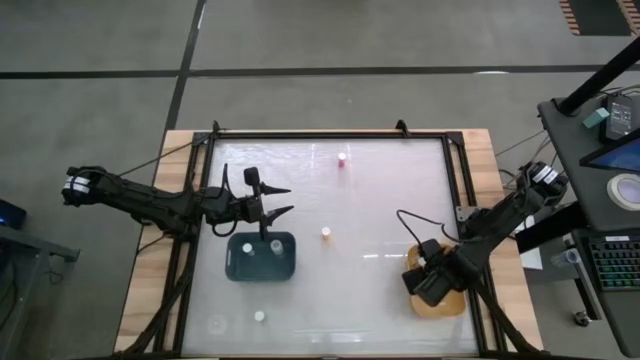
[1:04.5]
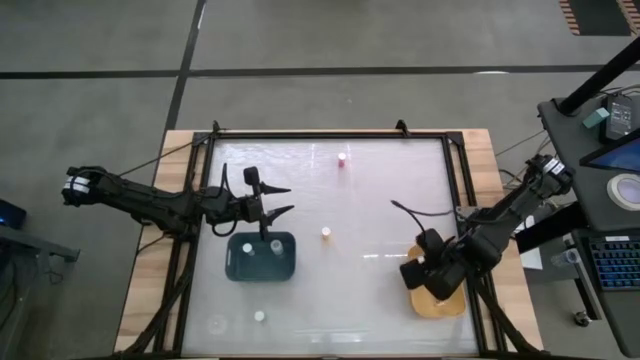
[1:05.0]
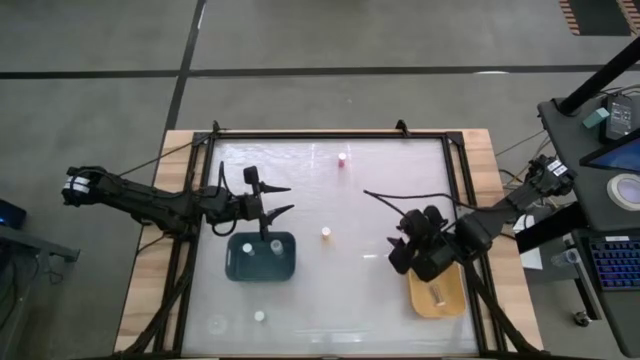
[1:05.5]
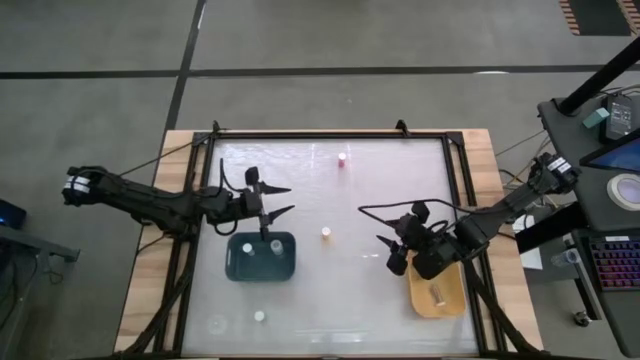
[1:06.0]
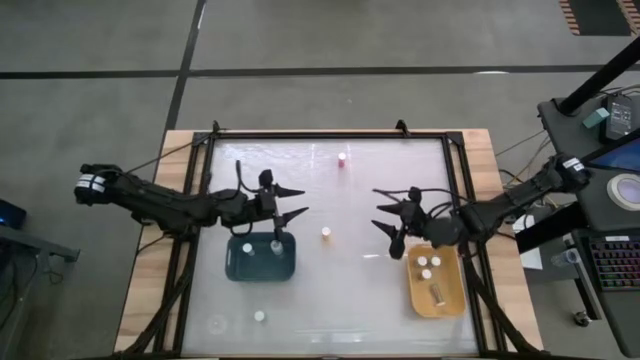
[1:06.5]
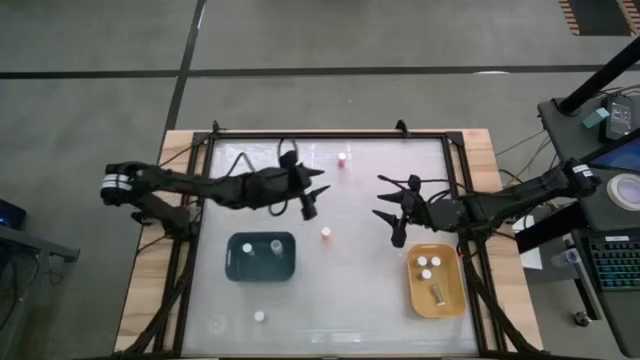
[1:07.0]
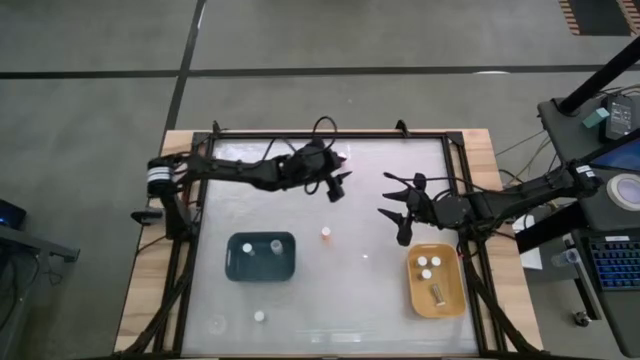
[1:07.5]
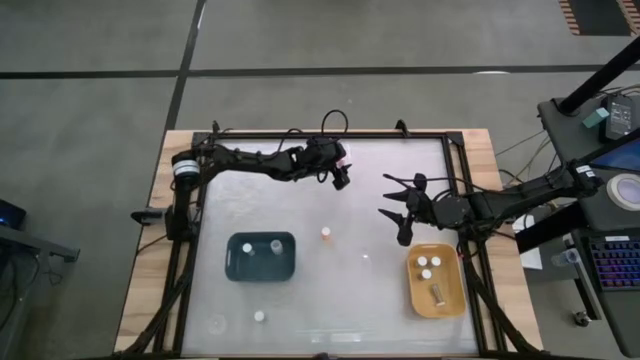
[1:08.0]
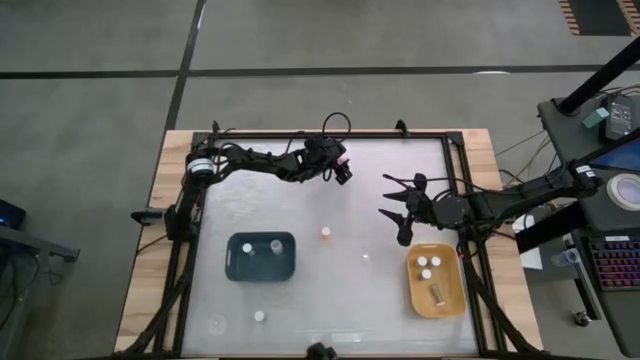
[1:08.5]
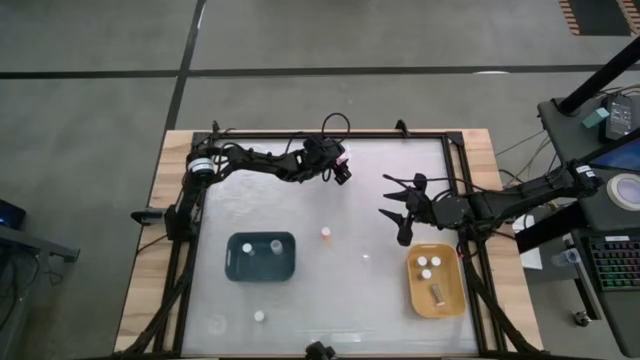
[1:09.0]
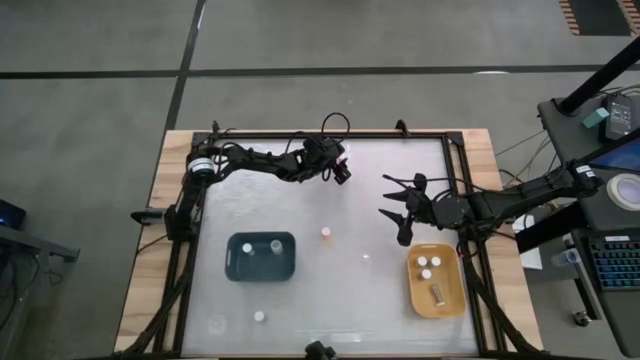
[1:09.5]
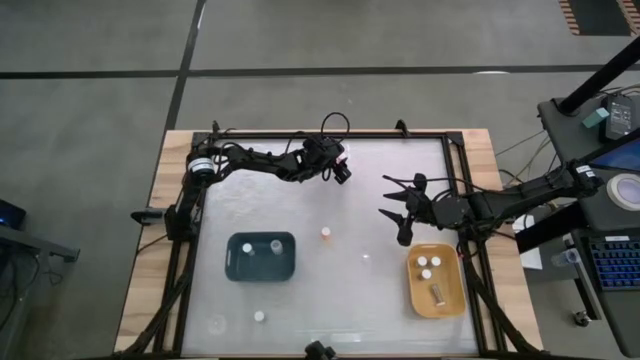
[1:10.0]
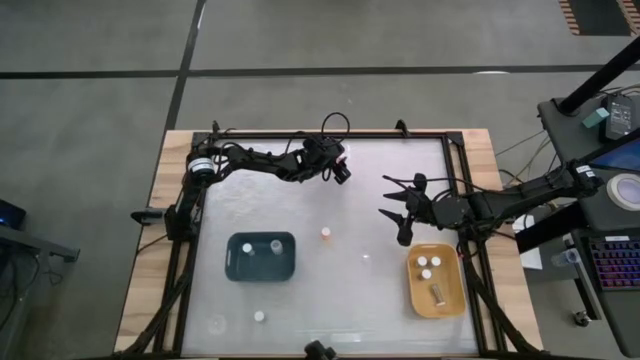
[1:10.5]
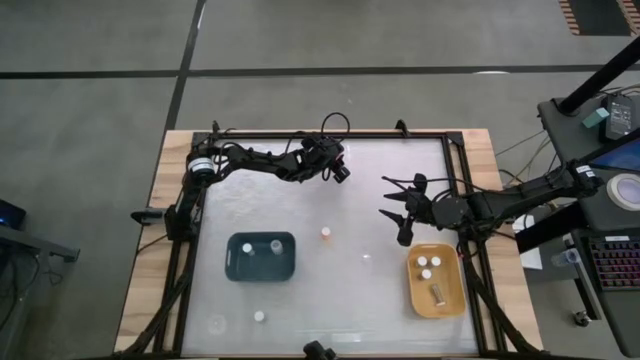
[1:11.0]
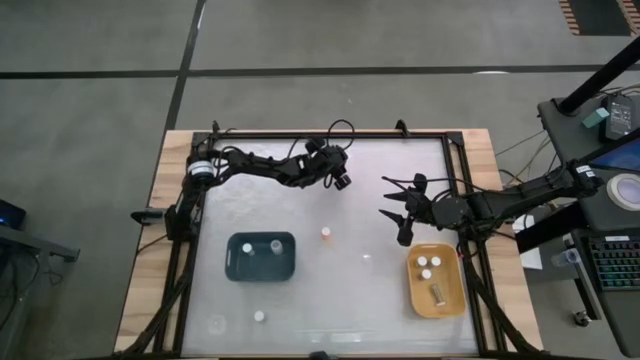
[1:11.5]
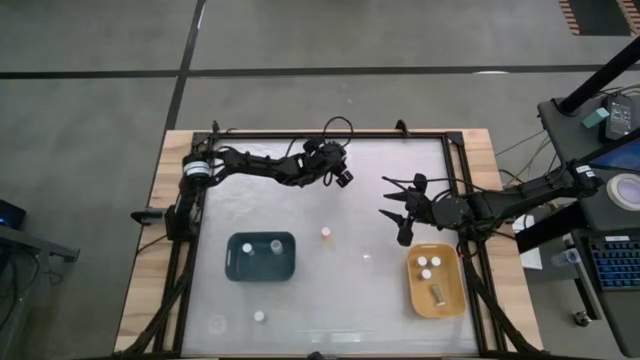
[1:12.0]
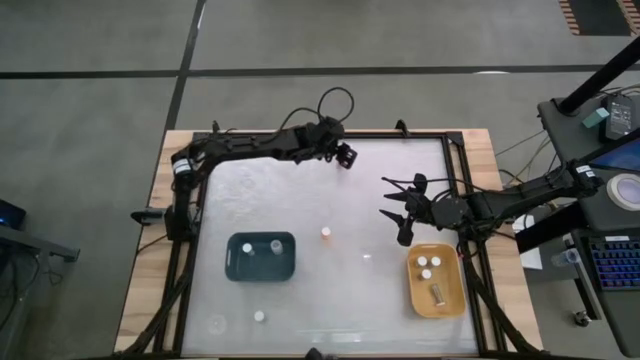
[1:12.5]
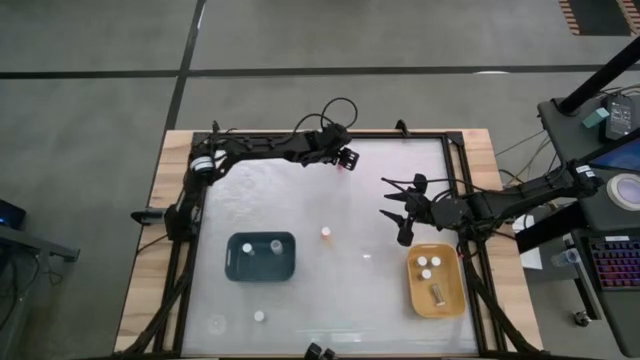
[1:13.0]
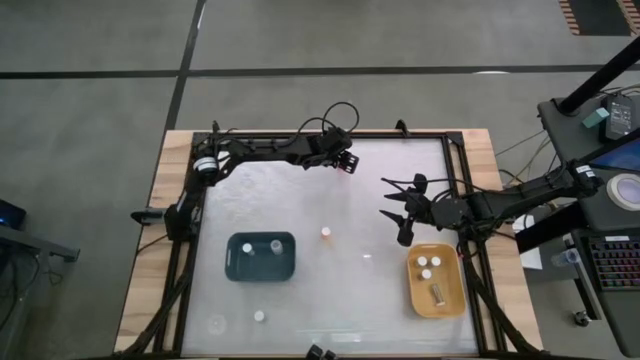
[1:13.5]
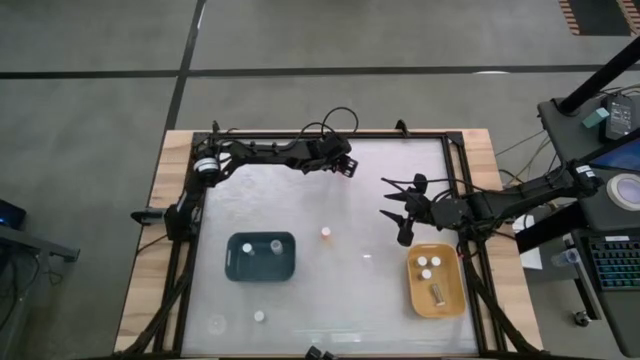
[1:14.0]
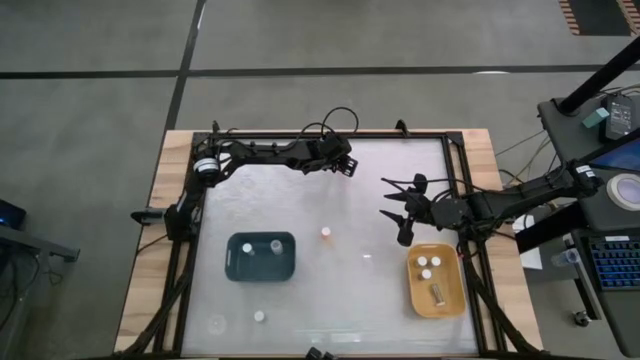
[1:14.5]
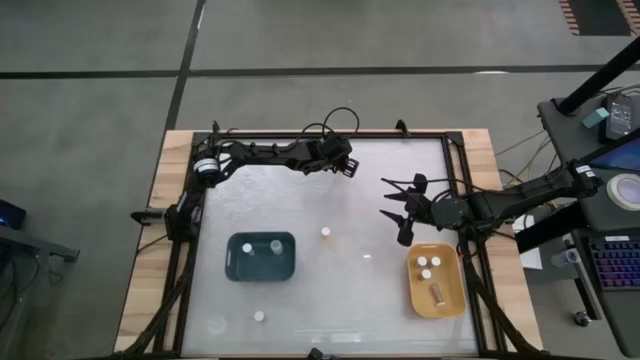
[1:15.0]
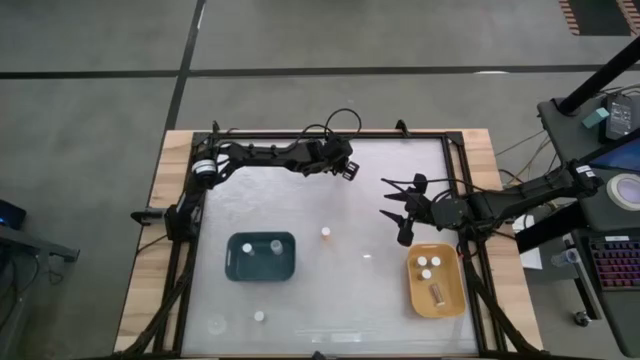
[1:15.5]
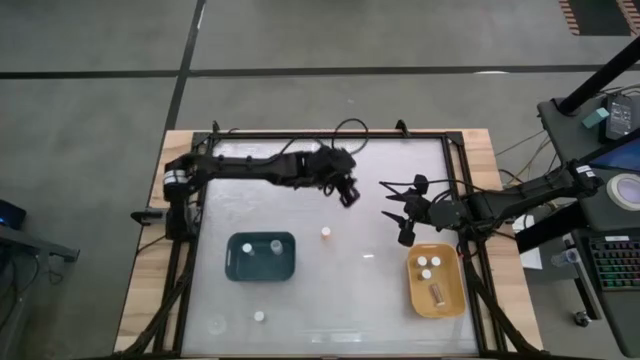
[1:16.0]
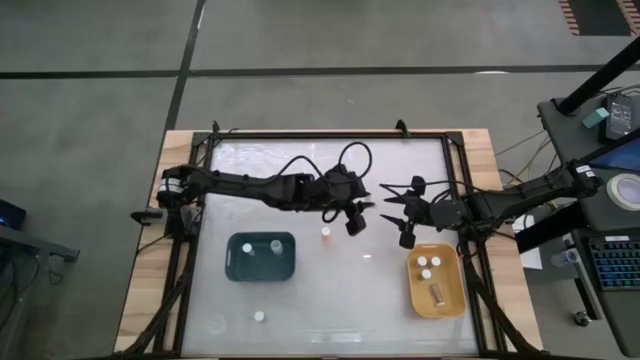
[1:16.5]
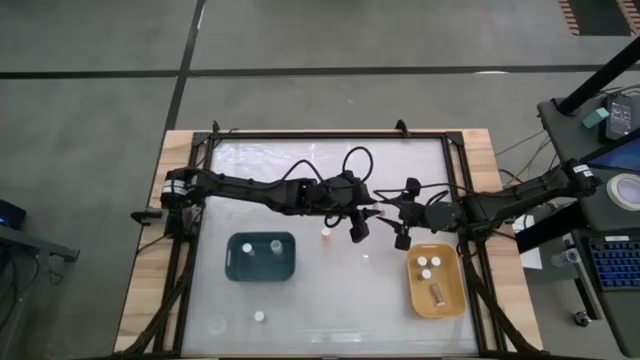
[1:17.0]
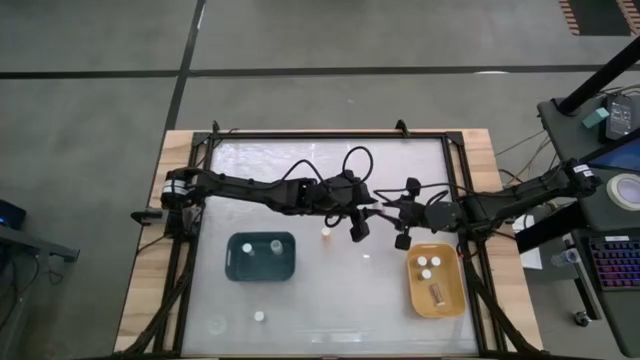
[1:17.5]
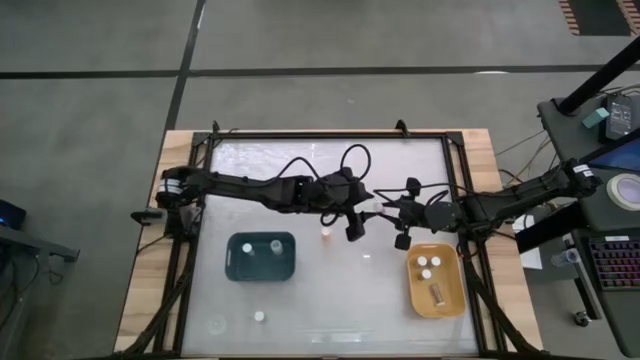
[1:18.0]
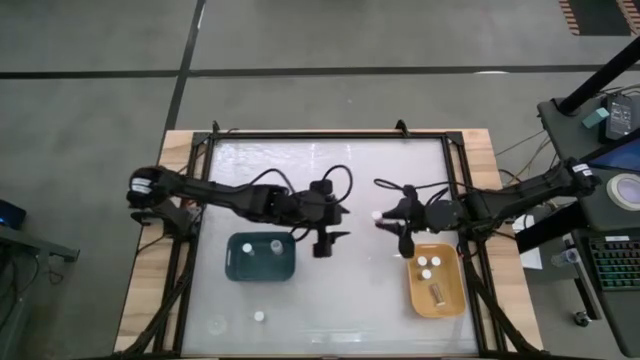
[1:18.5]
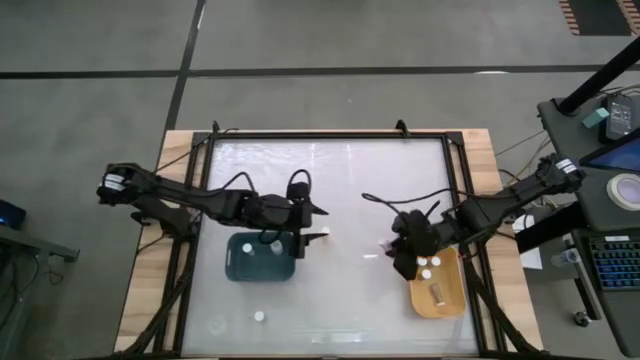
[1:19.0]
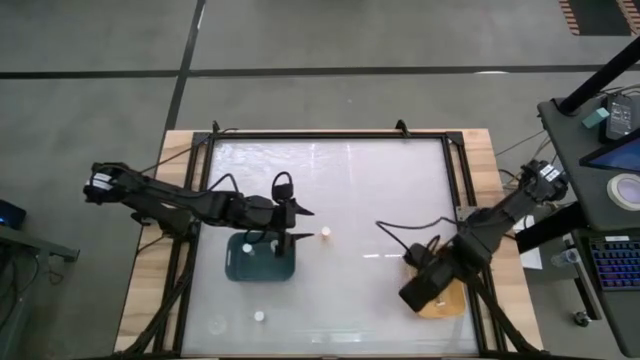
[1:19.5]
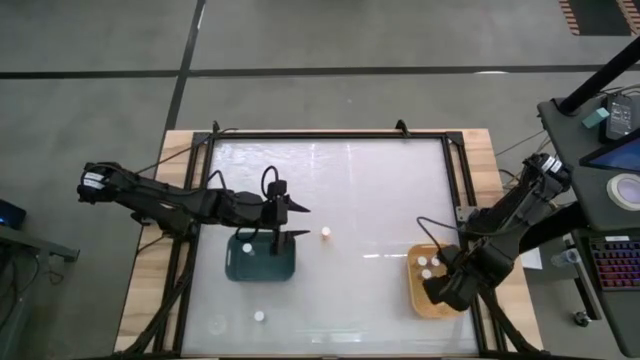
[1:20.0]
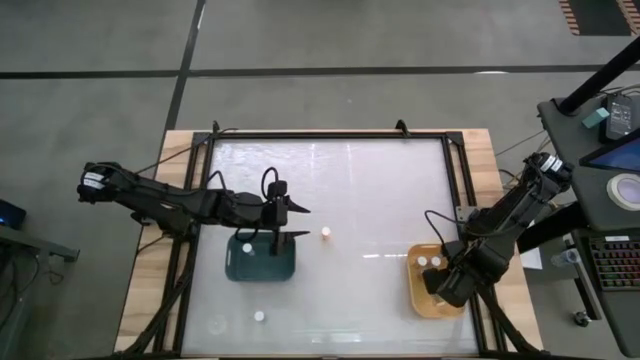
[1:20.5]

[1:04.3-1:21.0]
Task: Pick and place medicine bottles into bin by pill shape (circle, oval)
Put the pink bottled capsules into the yellow bin

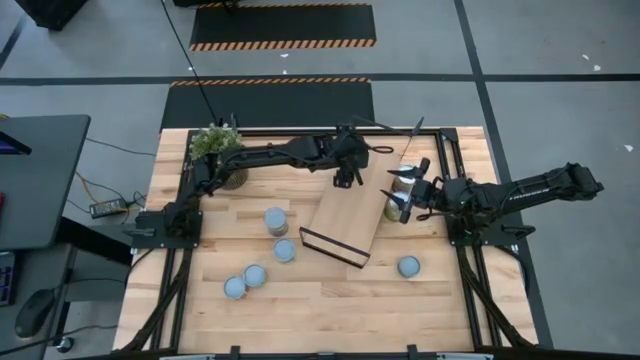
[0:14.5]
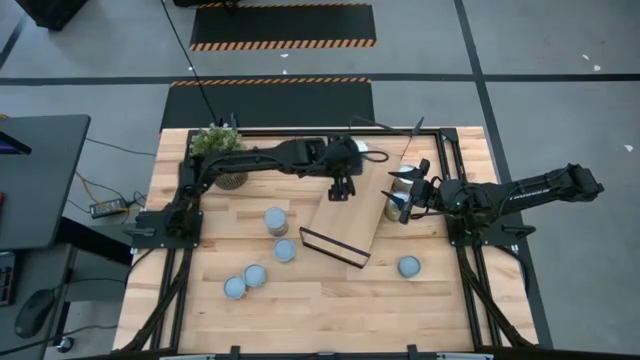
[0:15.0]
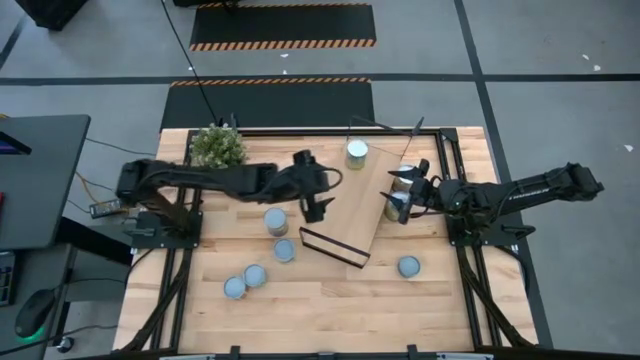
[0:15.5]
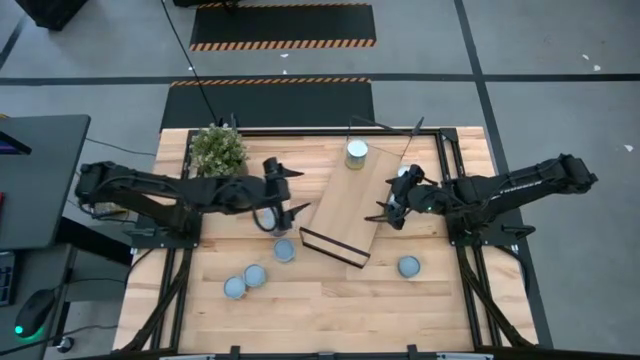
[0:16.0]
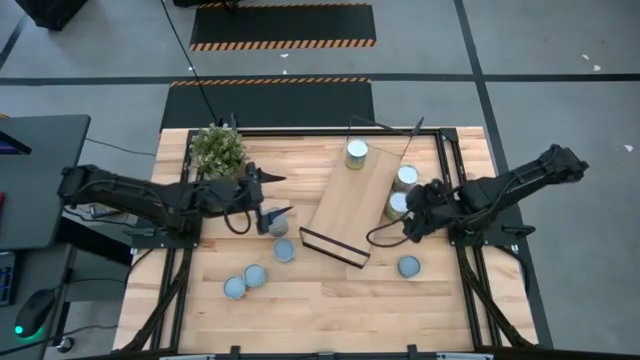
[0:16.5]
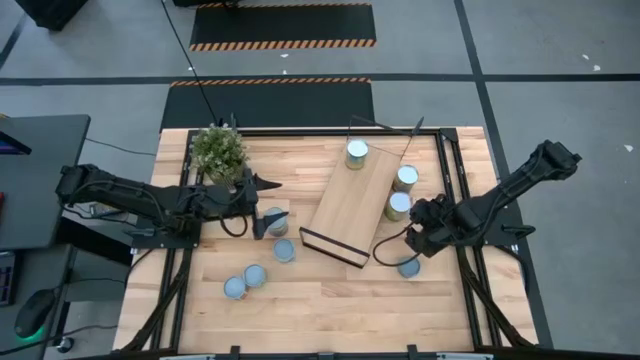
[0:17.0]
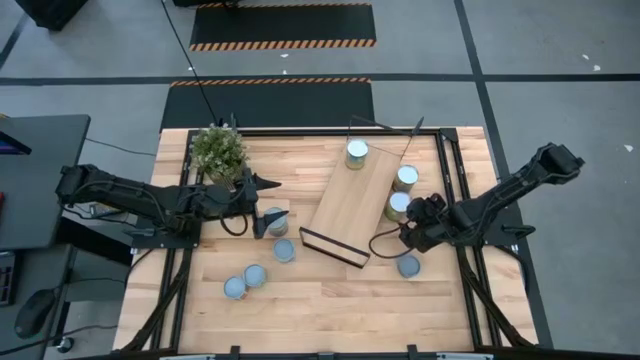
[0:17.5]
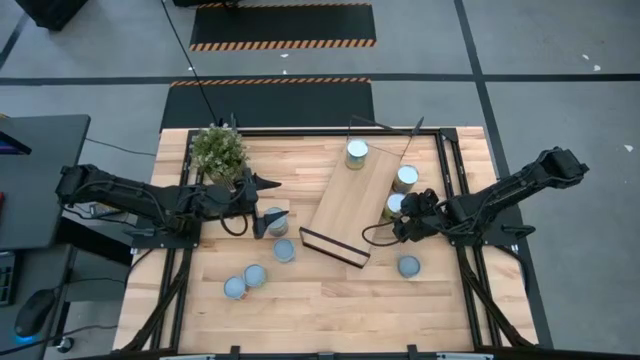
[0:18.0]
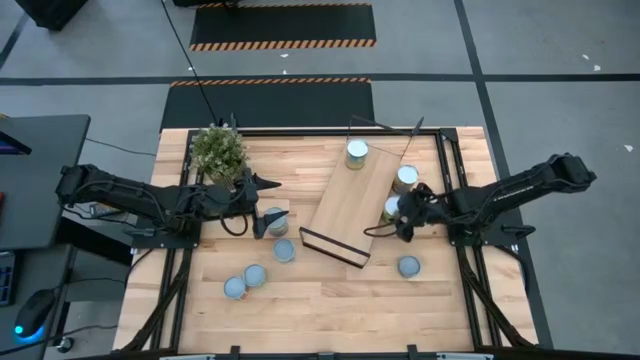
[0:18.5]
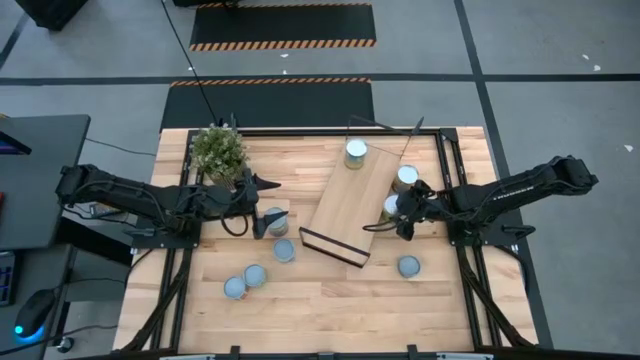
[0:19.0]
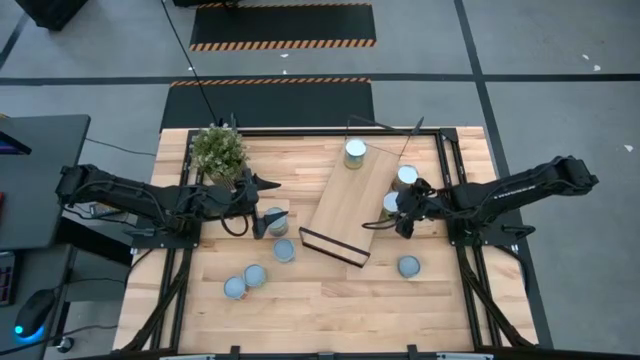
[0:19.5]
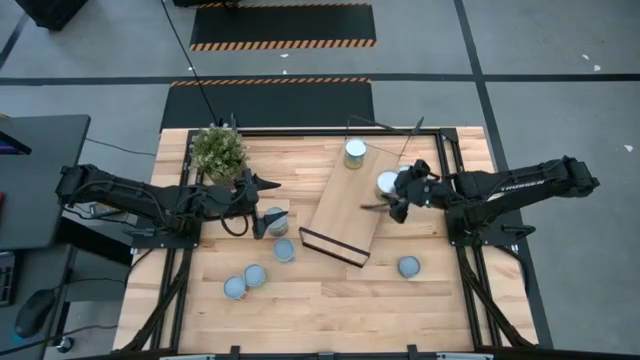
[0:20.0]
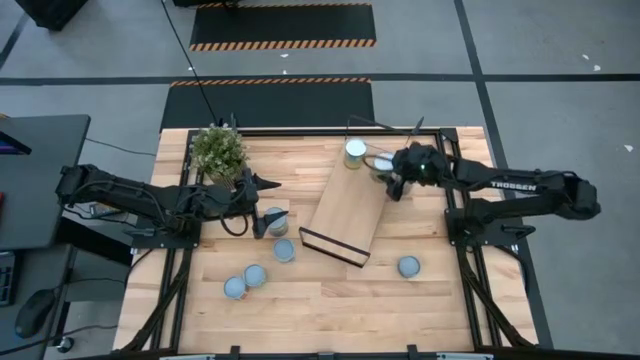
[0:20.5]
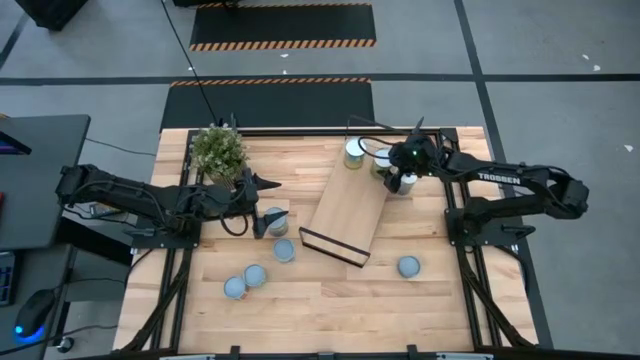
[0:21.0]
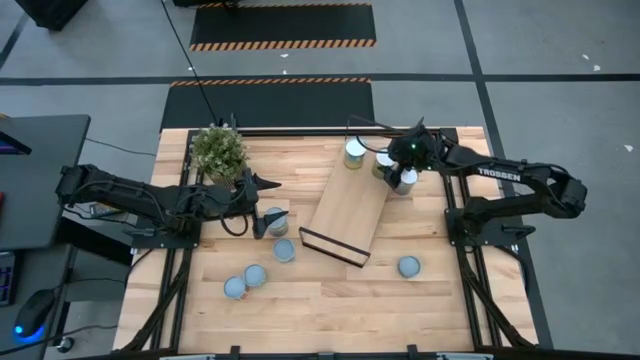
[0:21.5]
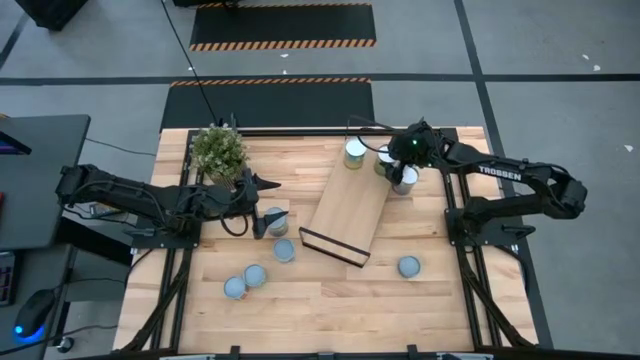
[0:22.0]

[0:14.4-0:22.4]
Task: Pick and place cans onto a shelf
Put the canned oranges on the shelf
